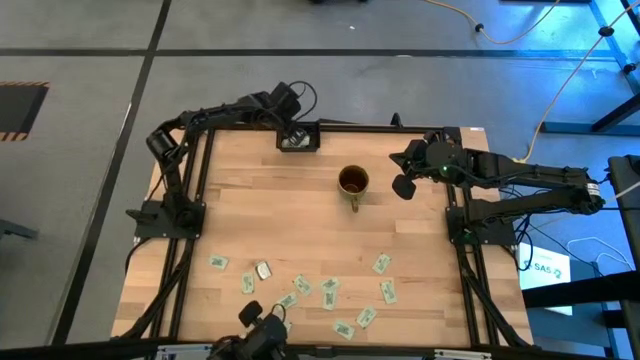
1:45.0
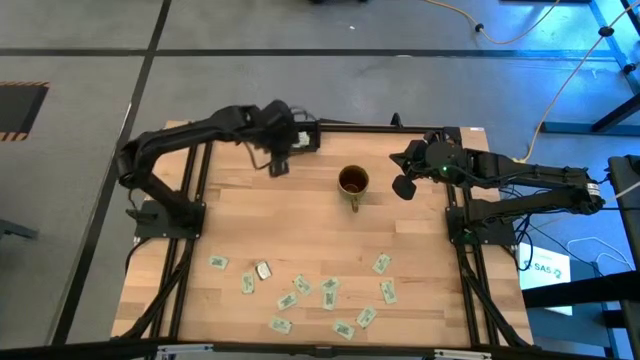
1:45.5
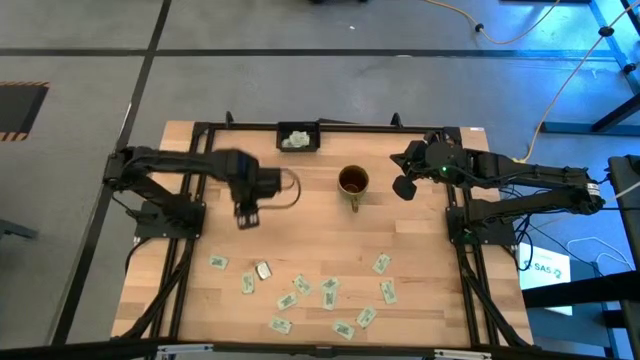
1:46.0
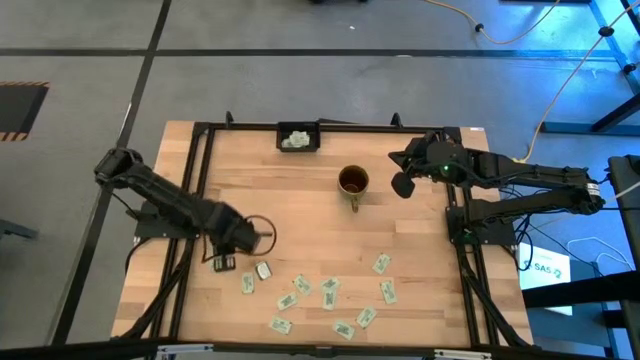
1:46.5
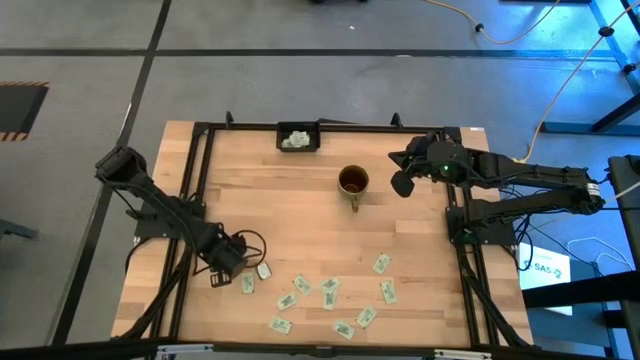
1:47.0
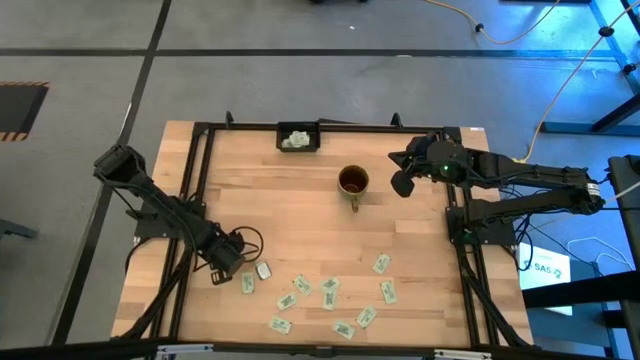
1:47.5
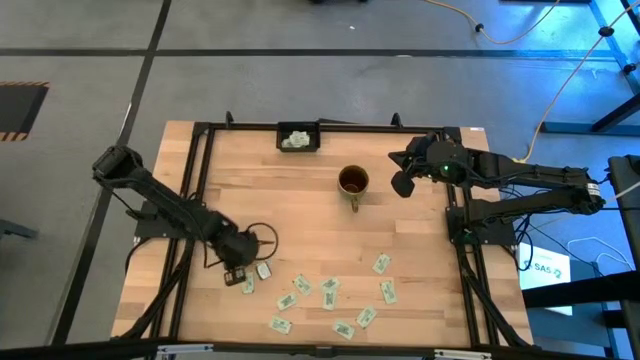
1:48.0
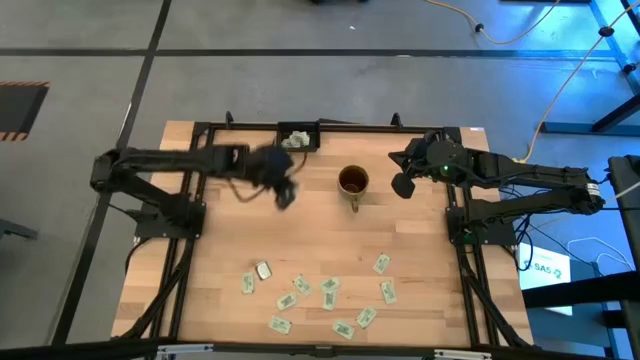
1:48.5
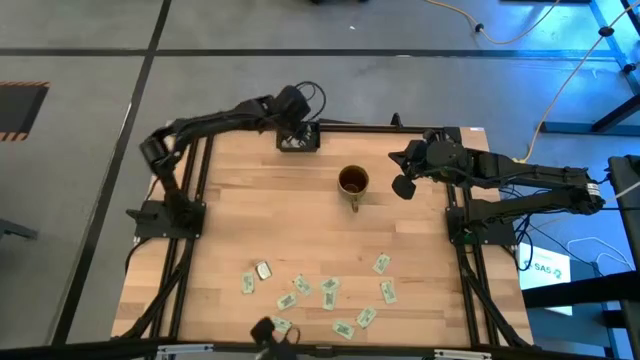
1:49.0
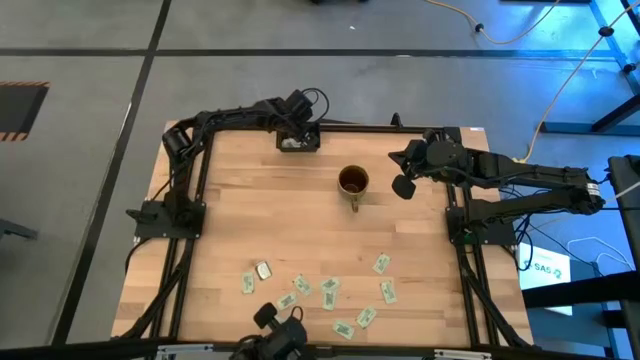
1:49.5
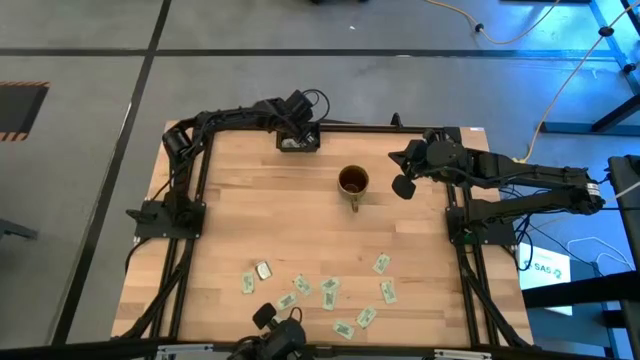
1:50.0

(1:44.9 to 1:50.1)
Task: Pick and place Stevia / Truvia into bins
Put the stevia packet into the black container

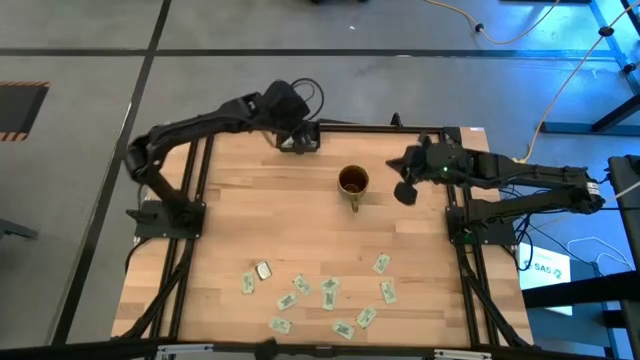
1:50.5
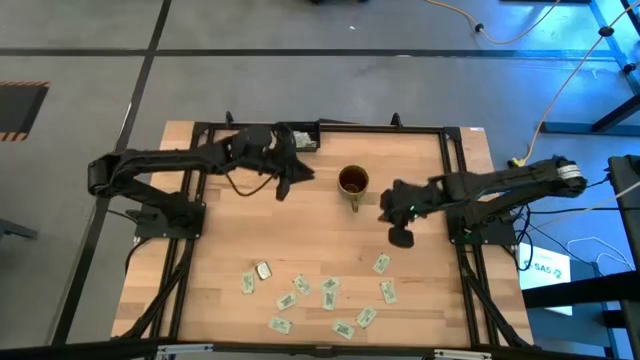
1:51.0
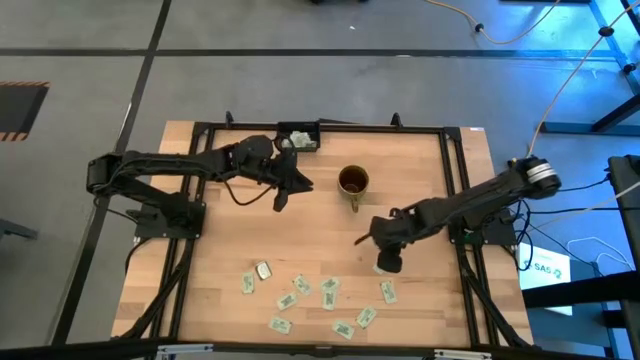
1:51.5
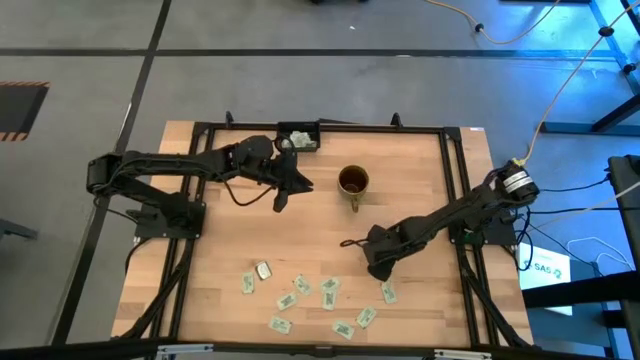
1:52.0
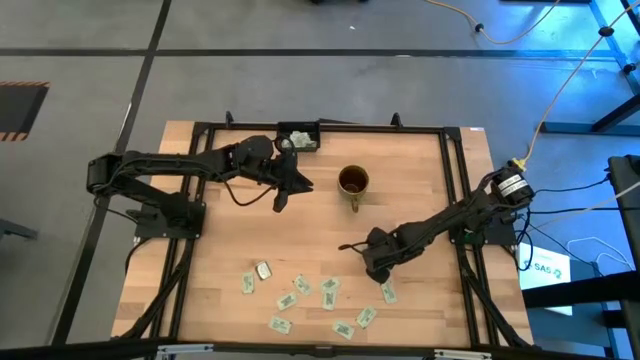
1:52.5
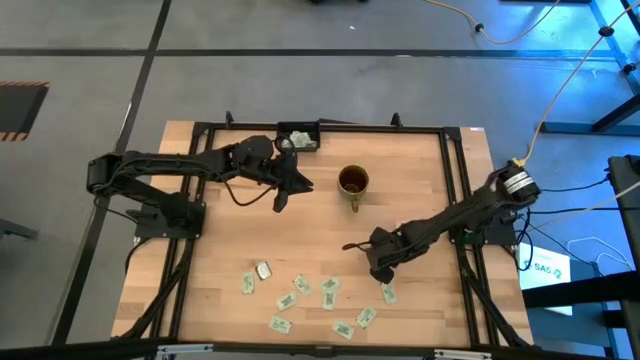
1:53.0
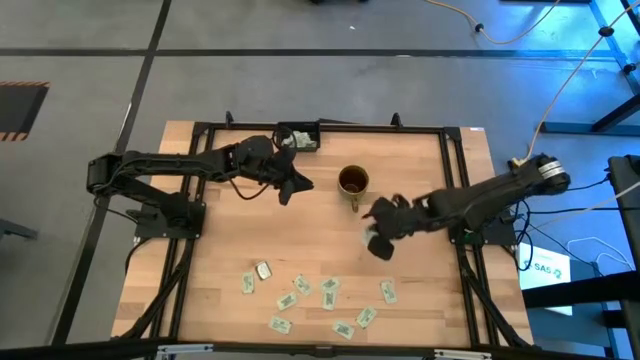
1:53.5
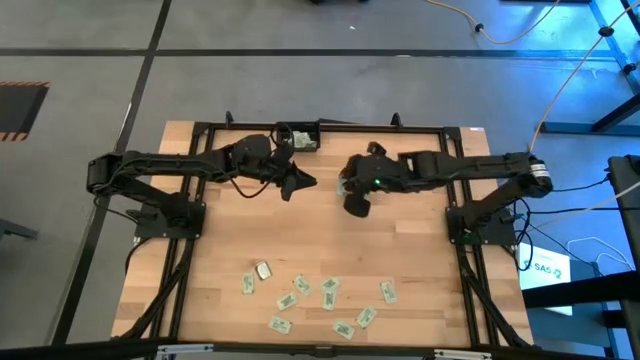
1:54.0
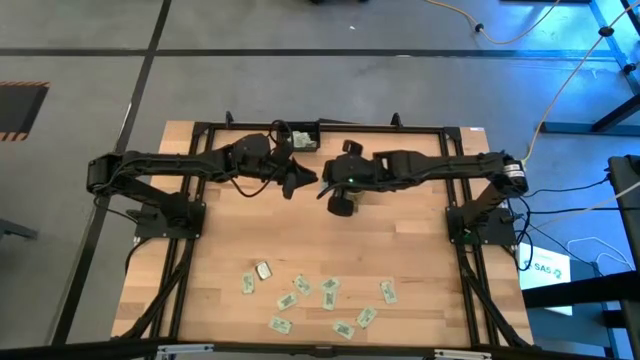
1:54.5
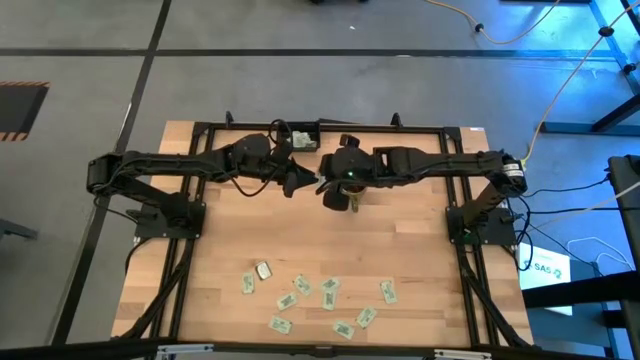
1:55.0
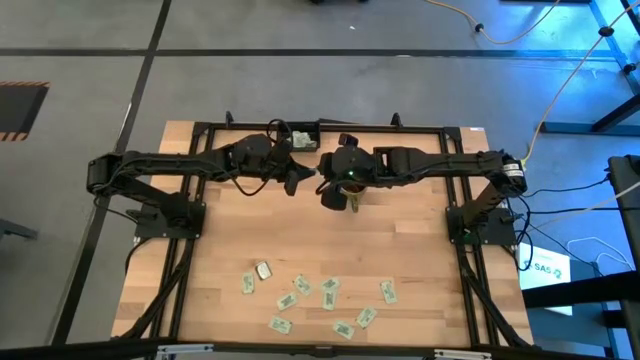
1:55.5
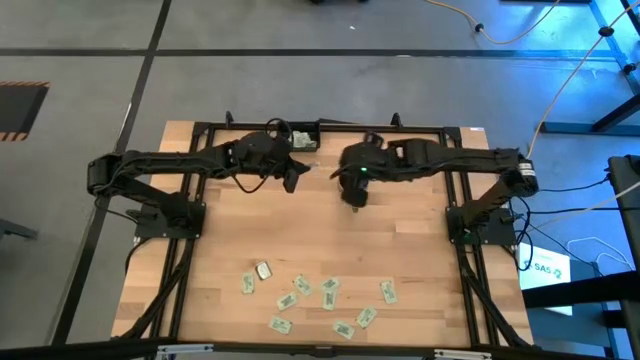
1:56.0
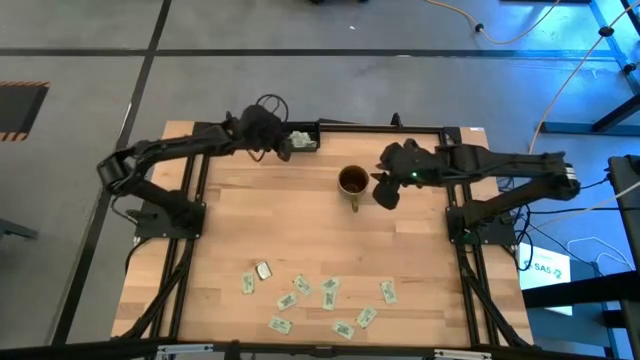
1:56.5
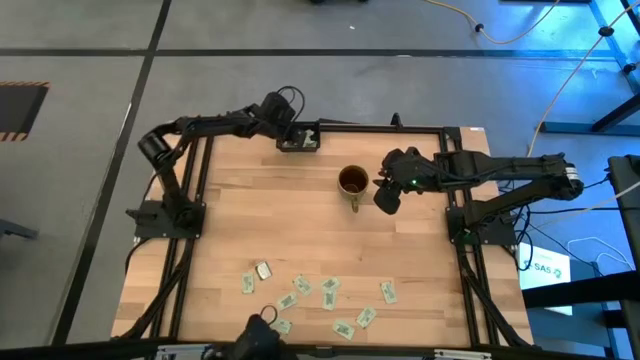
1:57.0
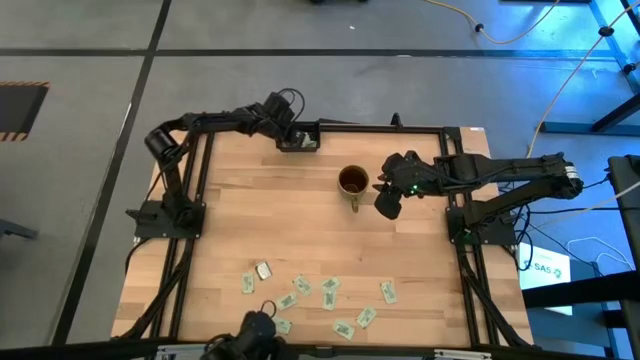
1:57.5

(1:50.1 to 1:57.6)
Put the stevia packet into the black container

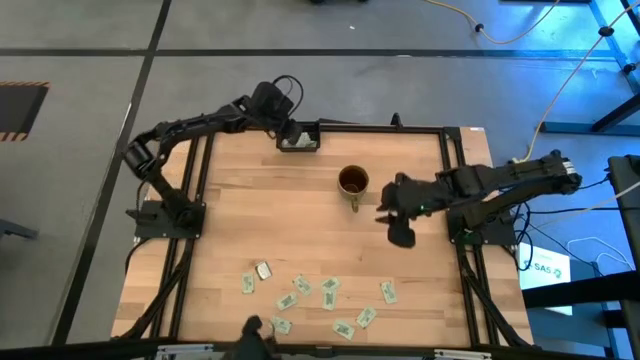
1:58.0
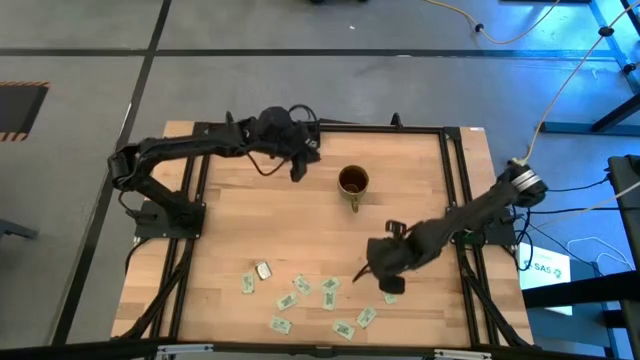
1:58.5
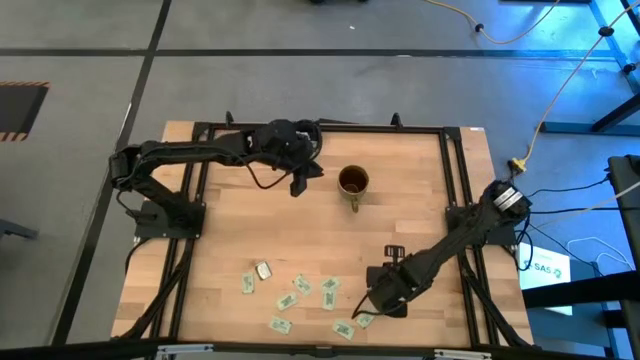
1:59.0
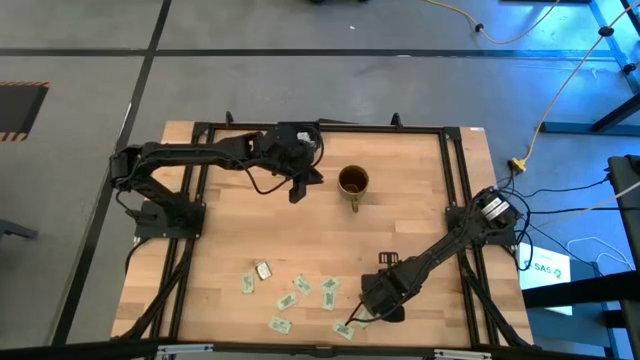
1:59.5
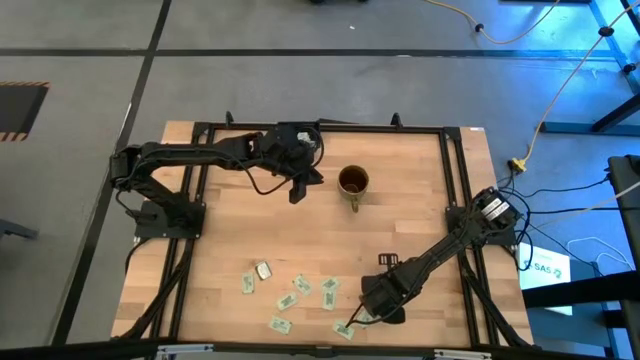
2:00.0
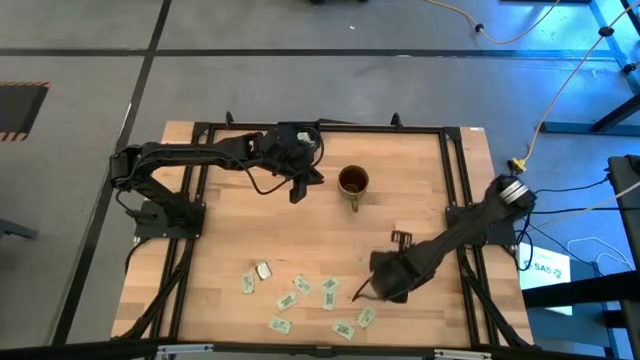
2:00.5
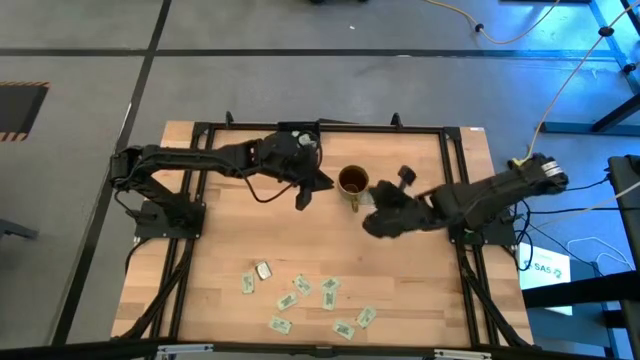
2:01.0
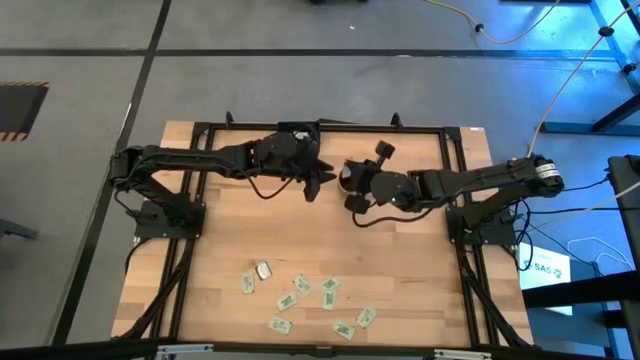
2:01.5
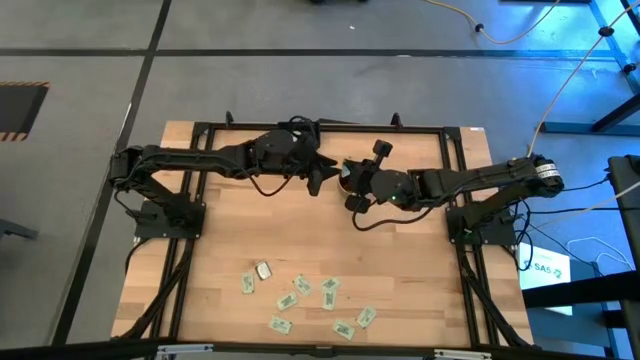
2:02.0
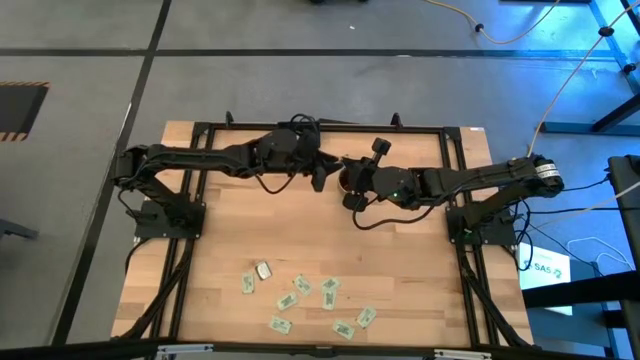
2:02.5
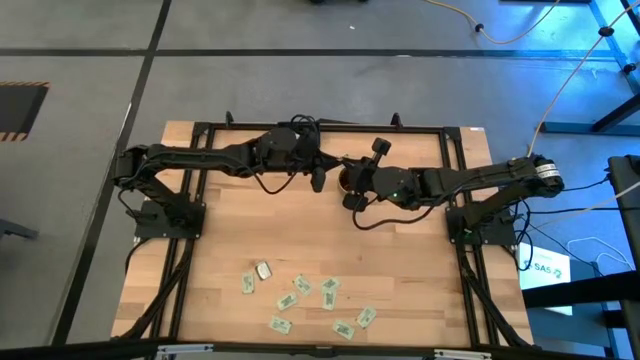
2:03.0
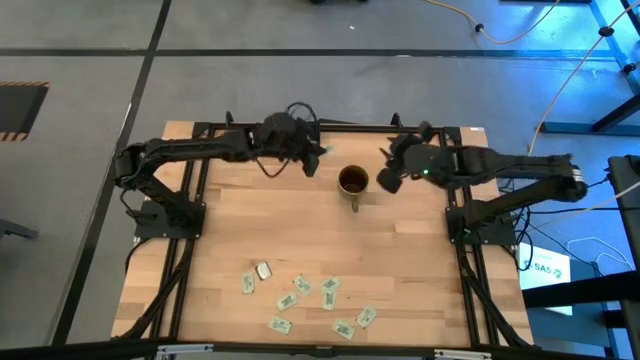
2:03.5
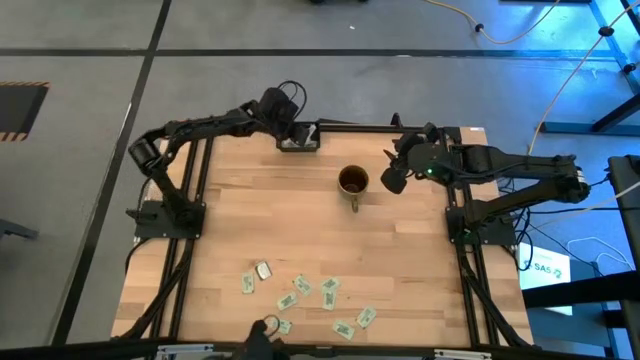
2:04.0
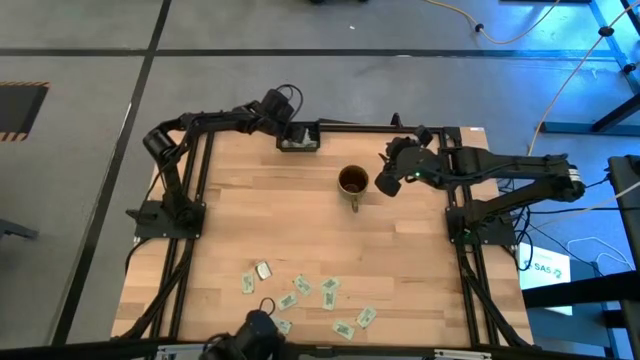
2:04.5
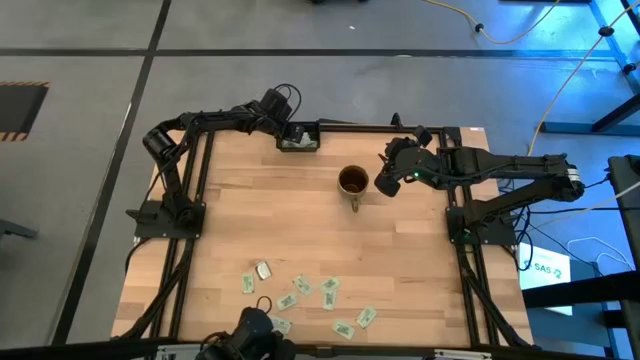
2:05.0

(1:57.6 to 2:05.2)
Put the stevia packet into the black container

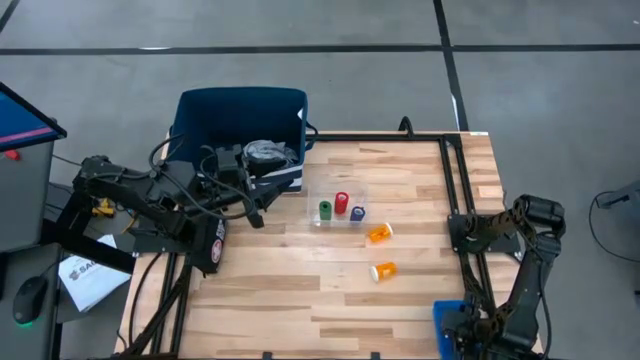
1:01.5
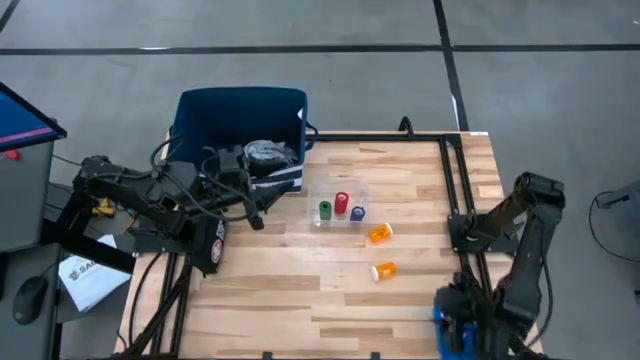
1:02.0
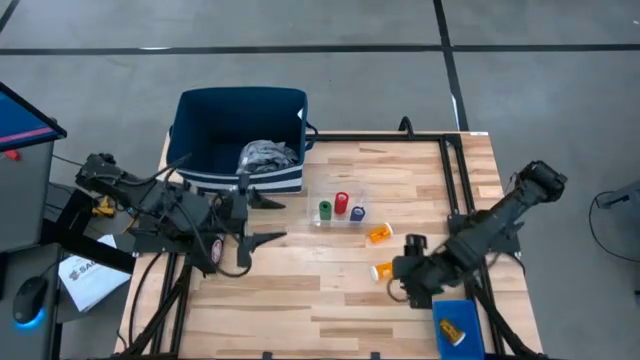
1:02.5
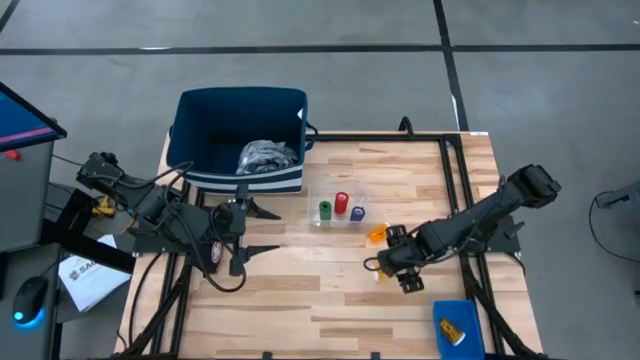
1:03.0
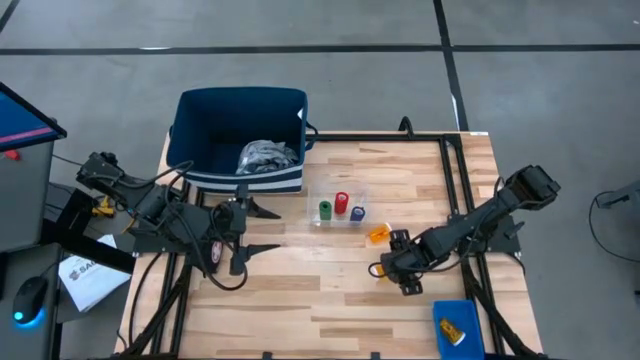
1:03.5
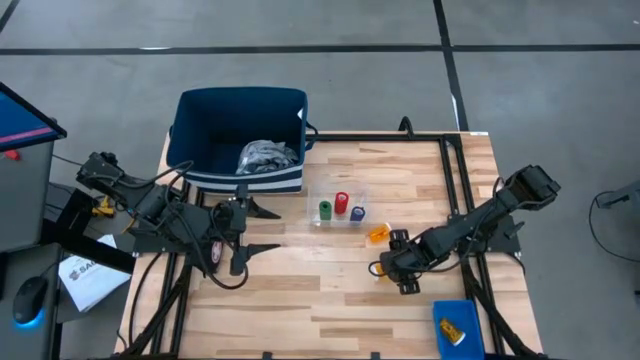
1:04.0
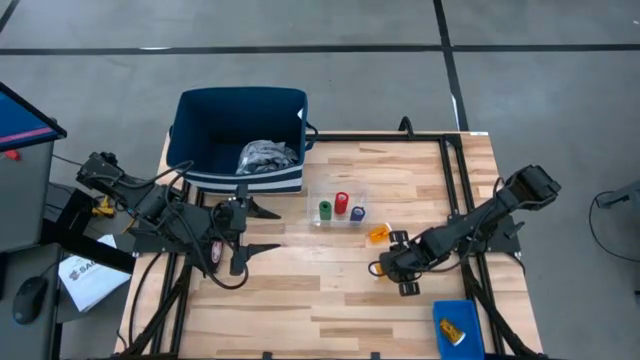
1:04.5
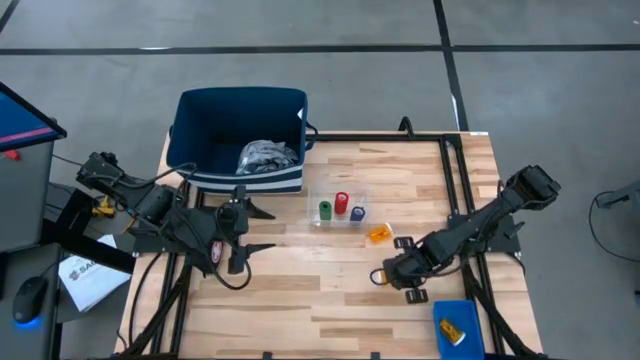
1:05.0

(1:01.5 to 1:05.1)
Task: Pick & place medical supplies in basket/bin
Put the bottom orange pill bottle into the blue basket
